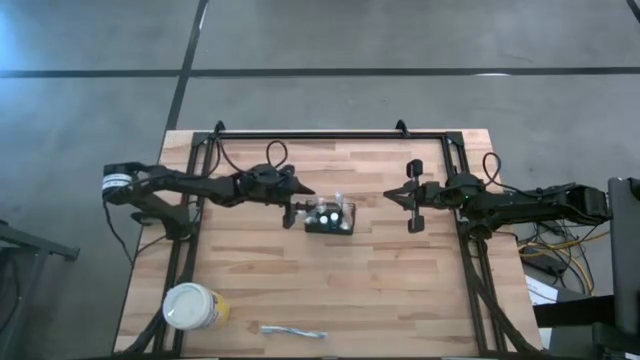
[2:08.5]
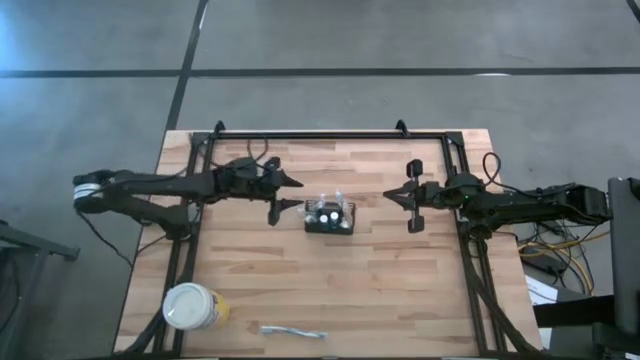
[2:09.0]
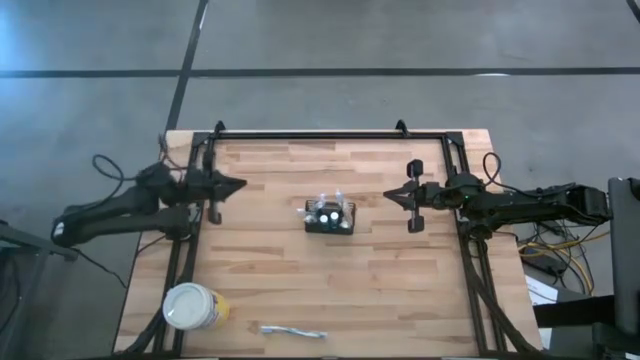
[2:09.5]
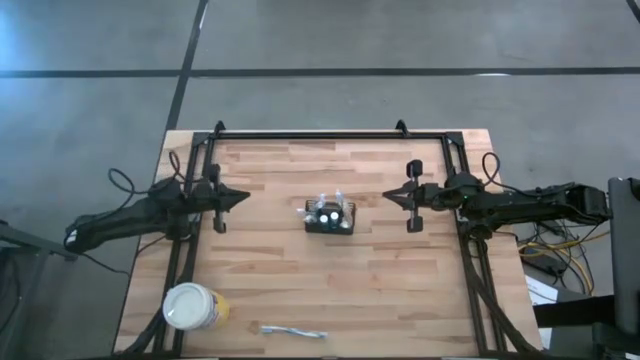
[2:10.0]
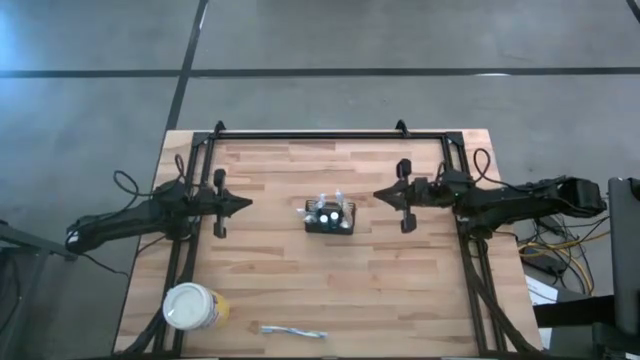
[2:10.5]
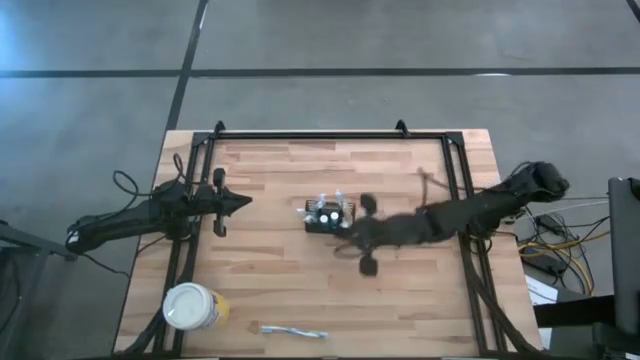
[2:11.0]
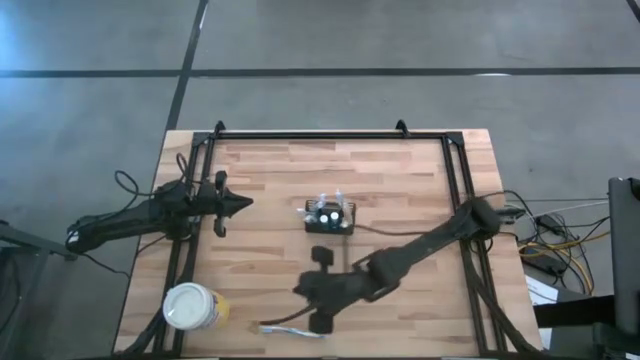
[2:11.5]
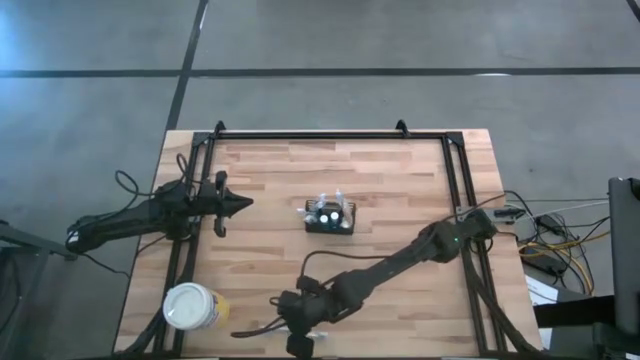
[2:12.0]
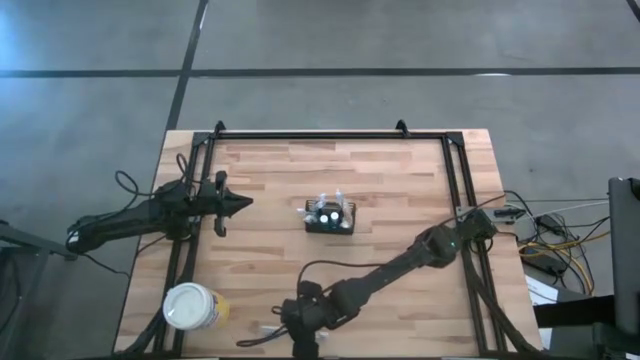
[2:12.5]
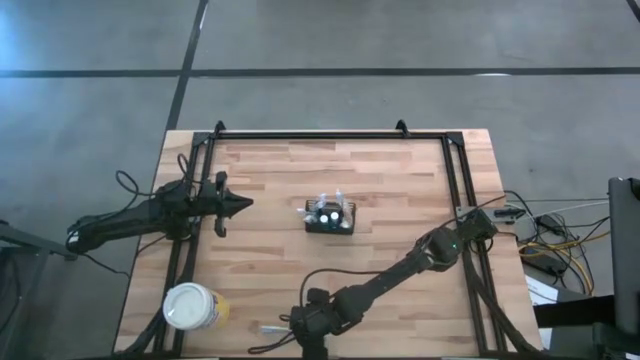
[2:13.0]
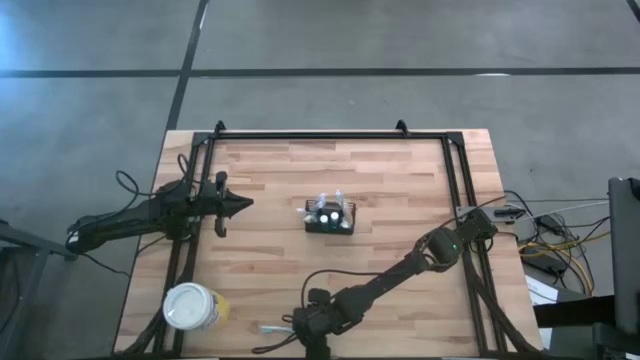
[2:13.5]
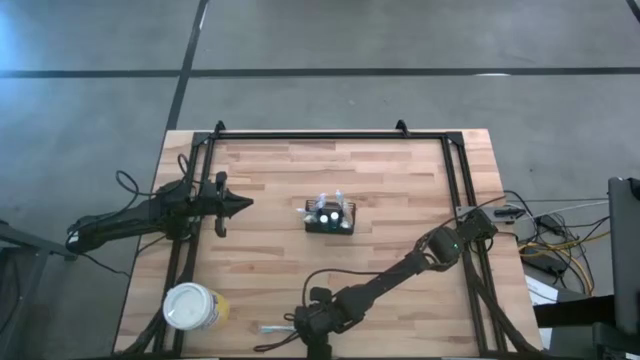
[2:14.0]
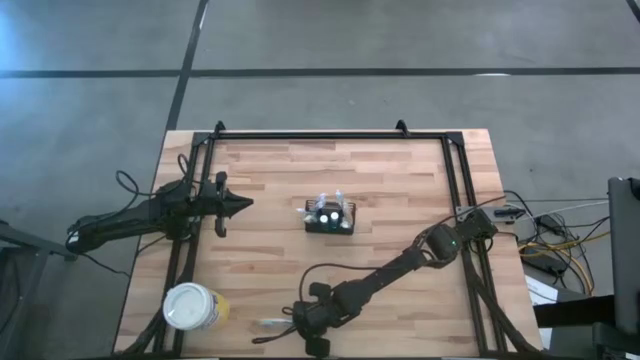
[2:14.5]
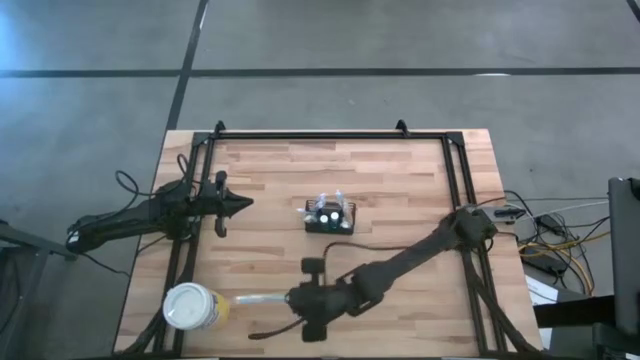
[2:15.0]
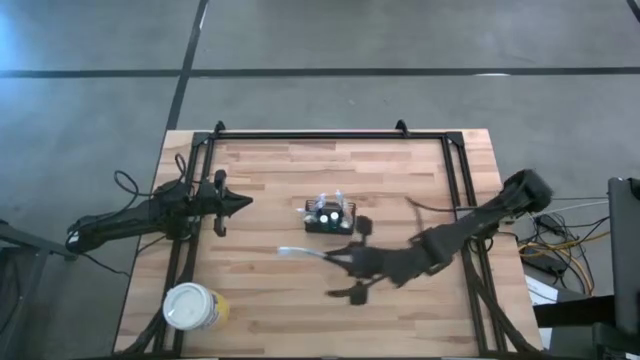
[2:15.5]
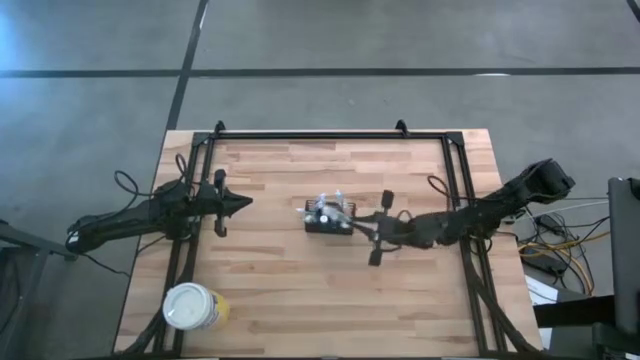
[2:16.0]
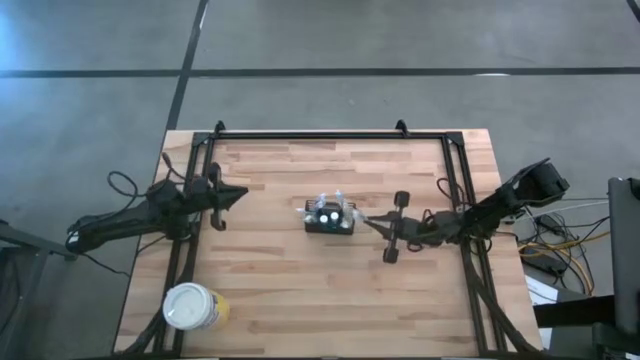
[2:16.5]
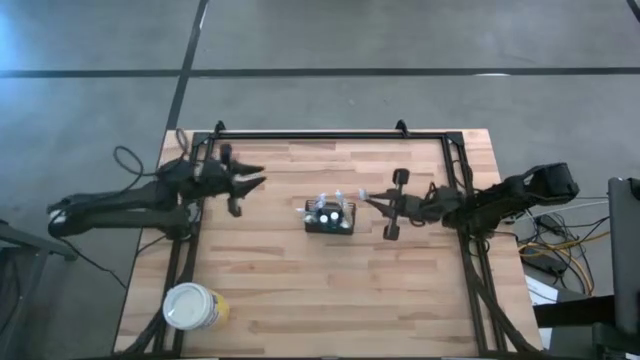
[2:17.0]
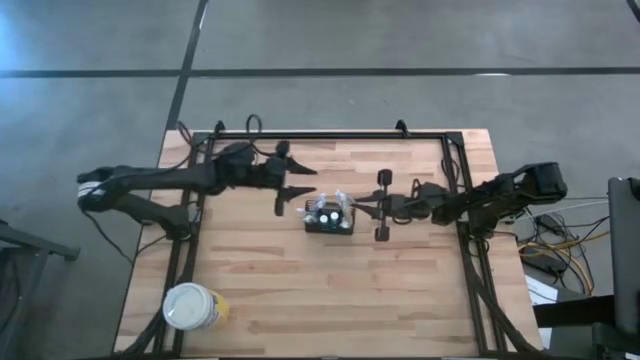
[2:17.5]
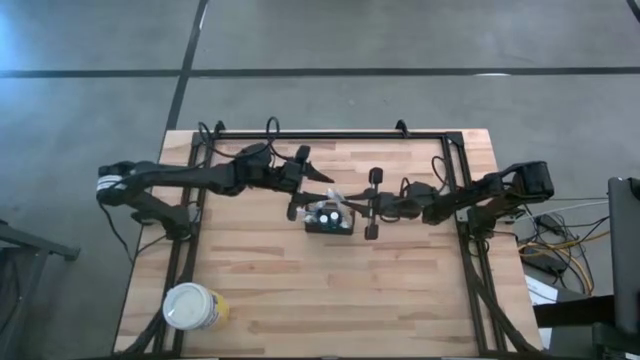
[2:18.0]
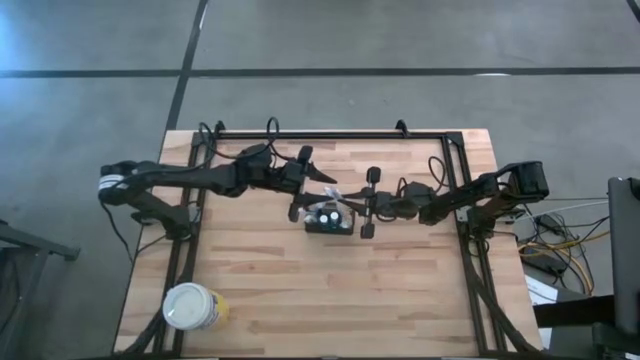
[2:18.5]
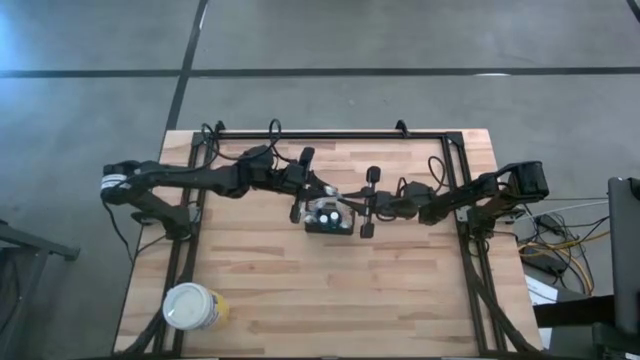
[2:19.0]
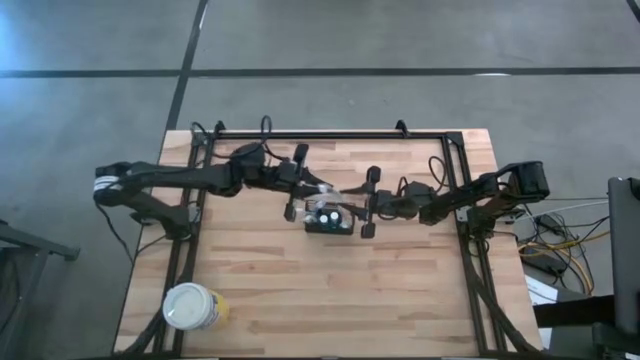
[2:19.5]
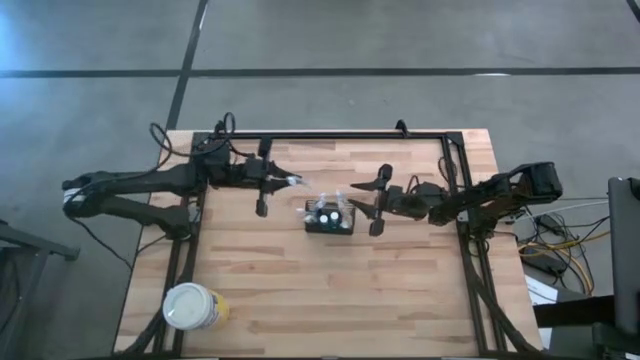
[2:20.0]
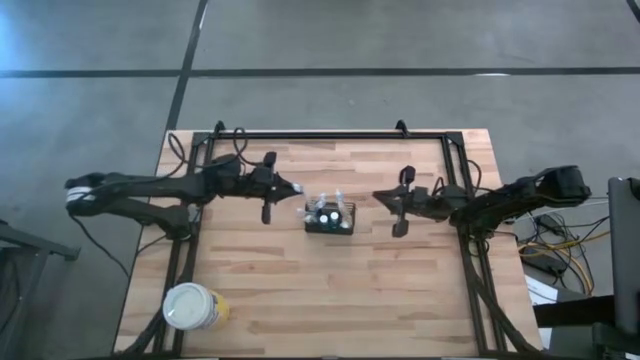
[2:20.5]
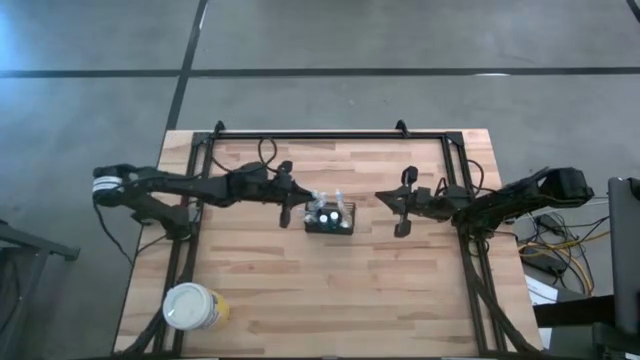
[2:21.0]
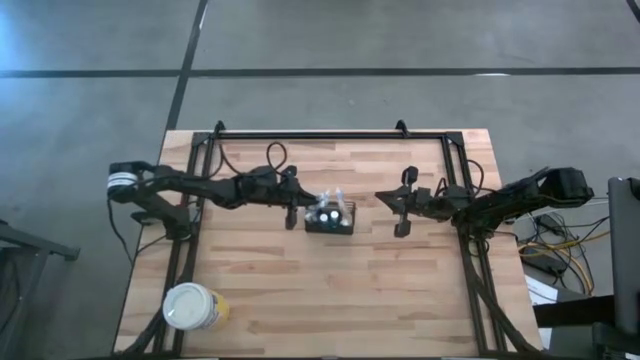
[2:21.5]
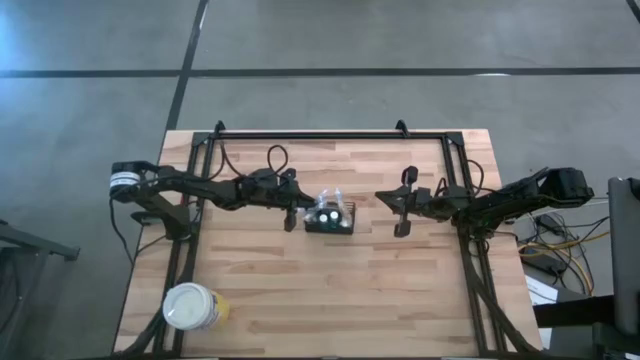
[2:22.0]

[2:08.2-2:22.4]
Task: Pick & Place toothbrushing station
Put the blue toothbrush into the wire organizer

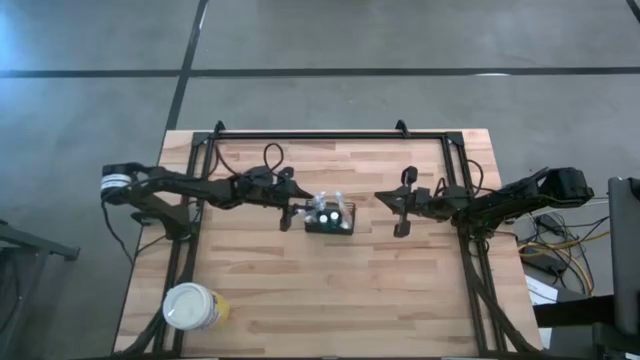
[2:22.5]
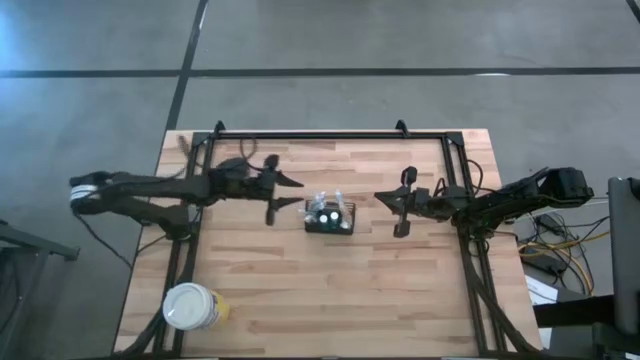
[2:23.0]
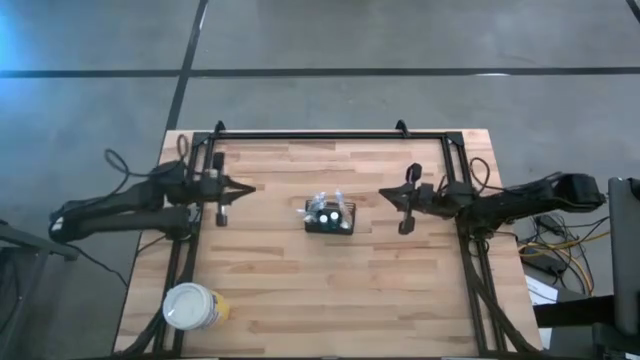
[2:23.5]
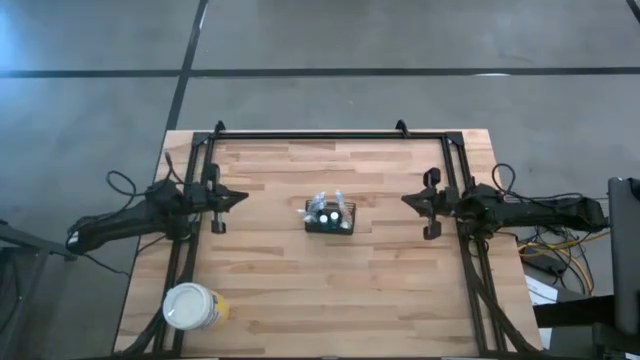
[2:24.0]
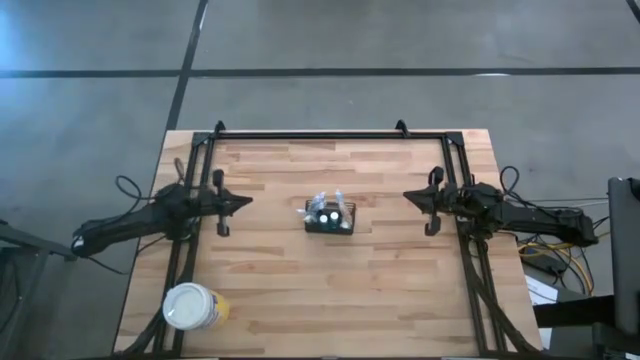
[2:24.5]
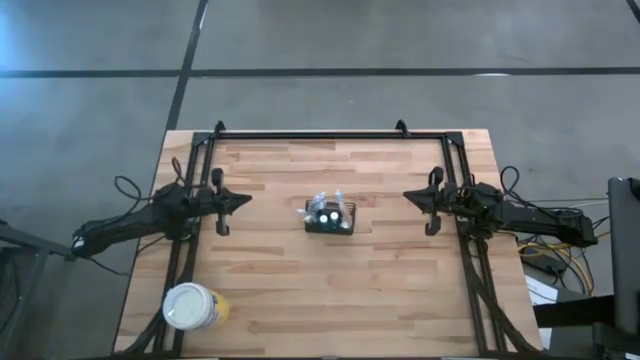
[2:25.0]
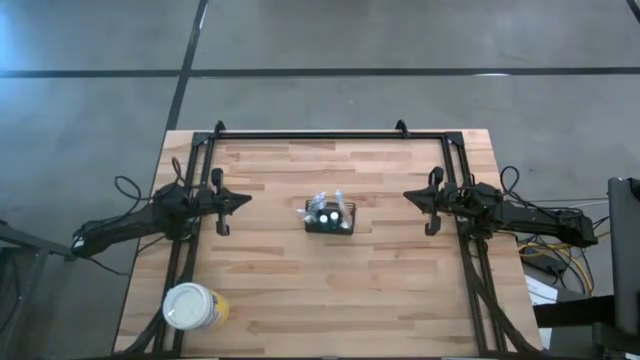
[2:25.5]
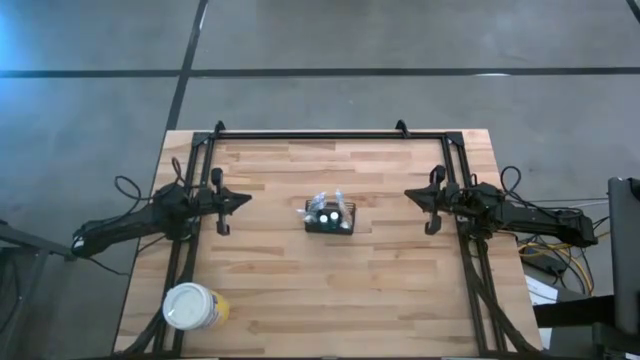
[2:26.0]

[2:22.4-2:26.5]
Return to Home Position

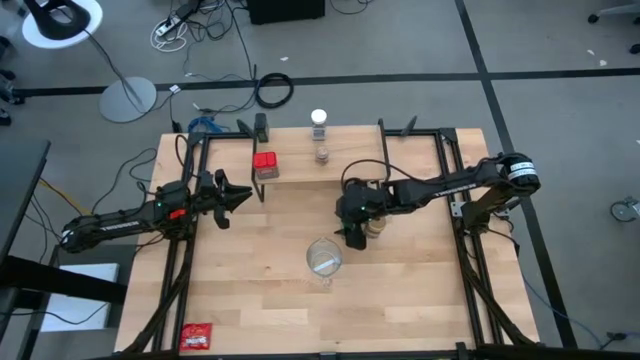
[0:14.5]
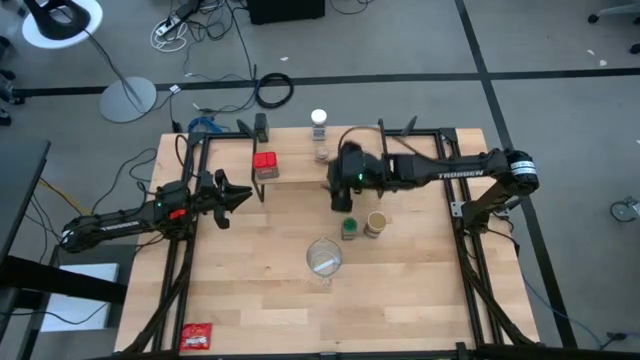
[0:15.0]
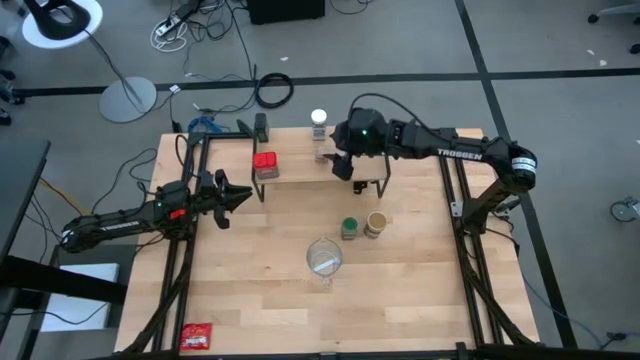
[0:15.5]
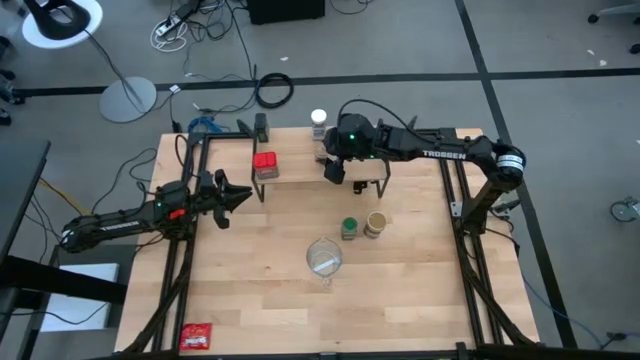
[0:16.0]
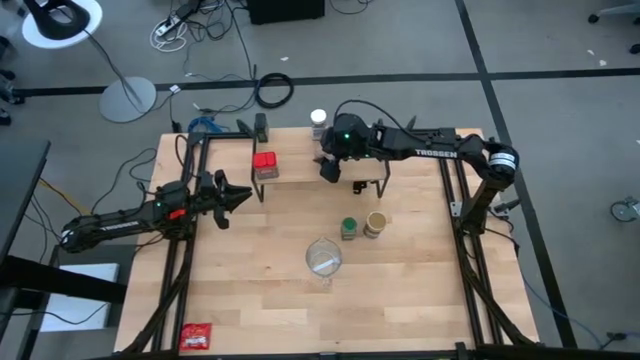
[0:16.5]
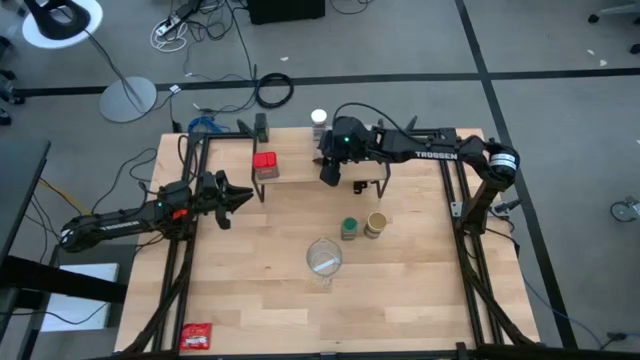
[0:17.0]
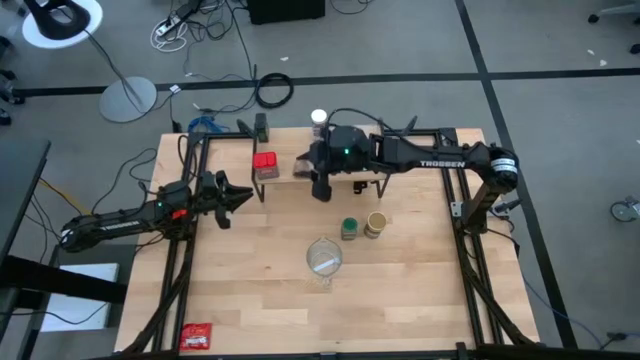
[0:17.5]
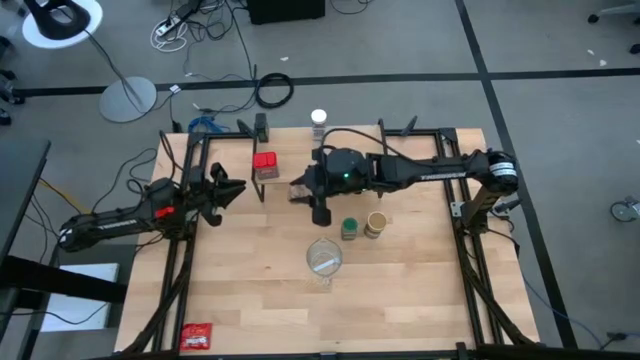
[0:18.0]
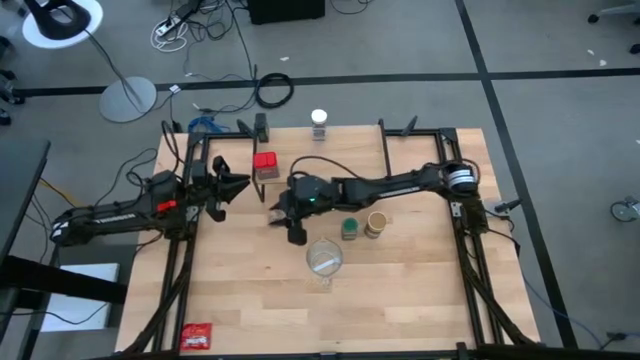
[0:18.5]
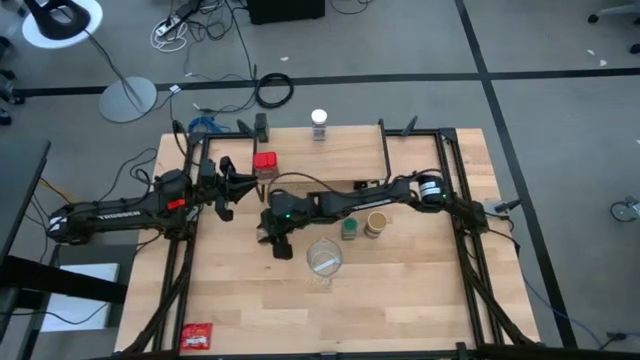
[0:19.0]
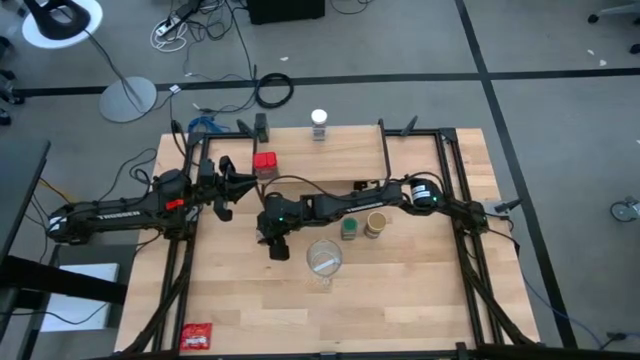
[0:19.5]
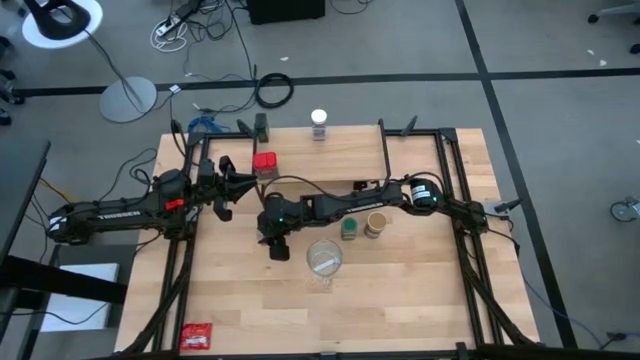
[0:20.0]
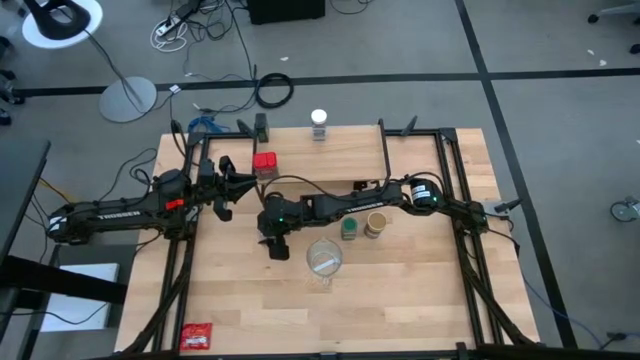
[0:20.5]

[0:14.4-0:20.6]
Task: Shelf spices
Remove the transparent seasoning bottle from the shelf
